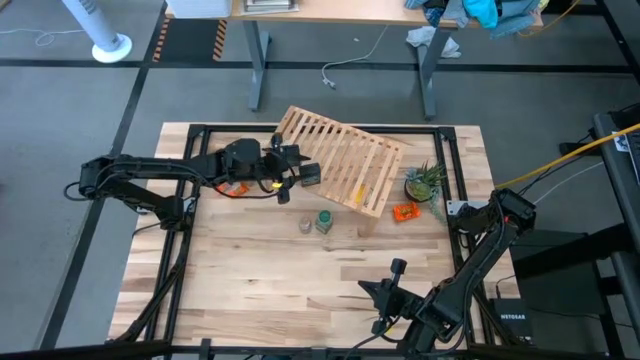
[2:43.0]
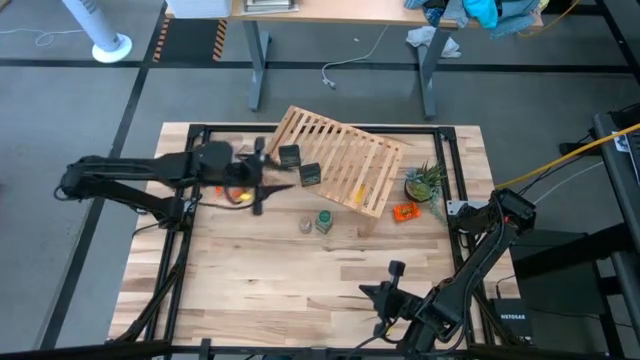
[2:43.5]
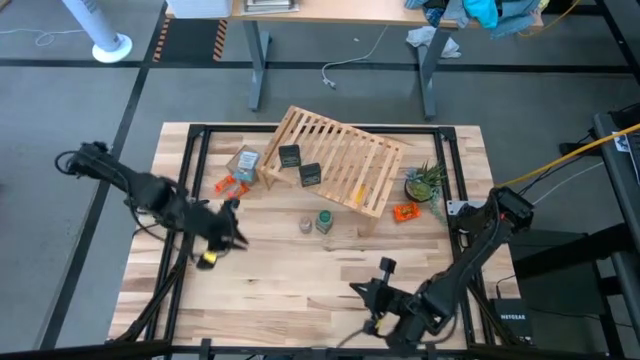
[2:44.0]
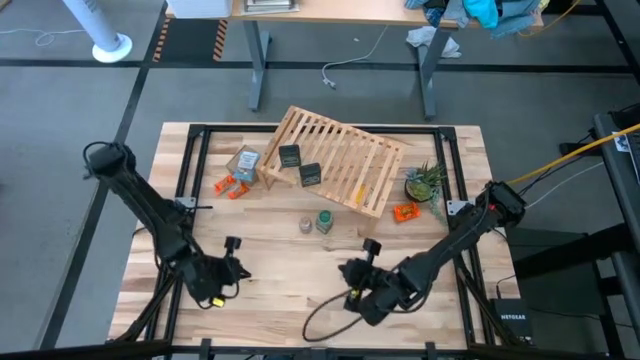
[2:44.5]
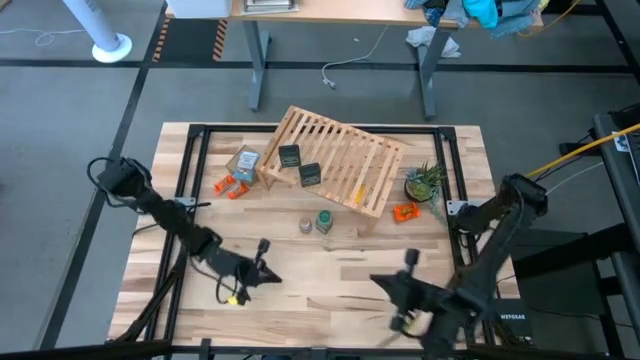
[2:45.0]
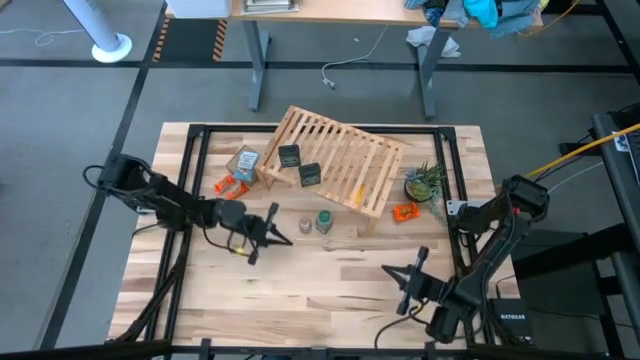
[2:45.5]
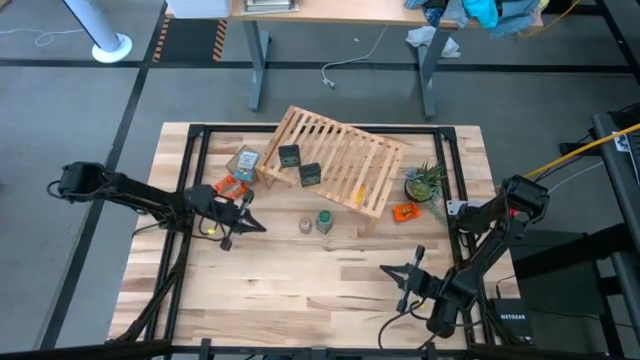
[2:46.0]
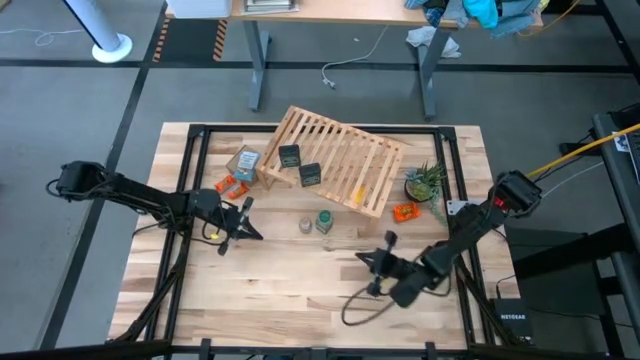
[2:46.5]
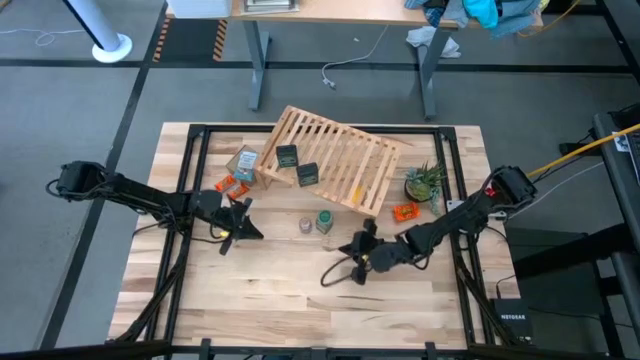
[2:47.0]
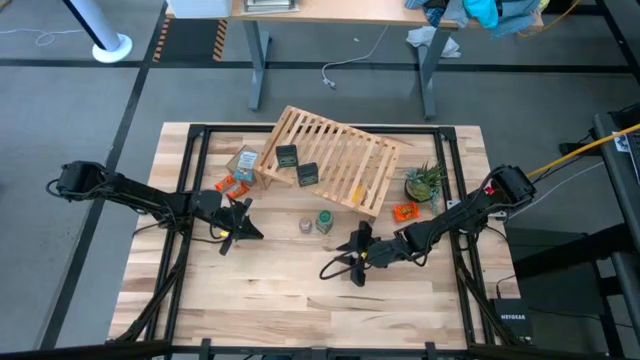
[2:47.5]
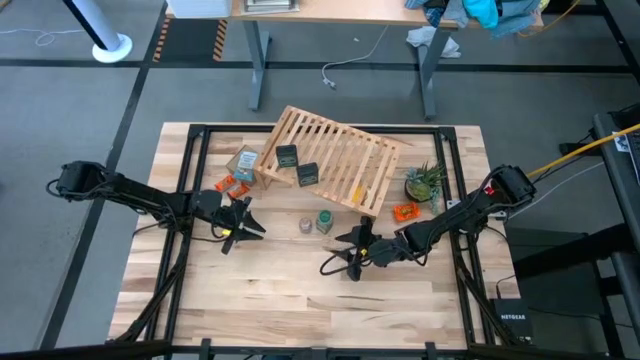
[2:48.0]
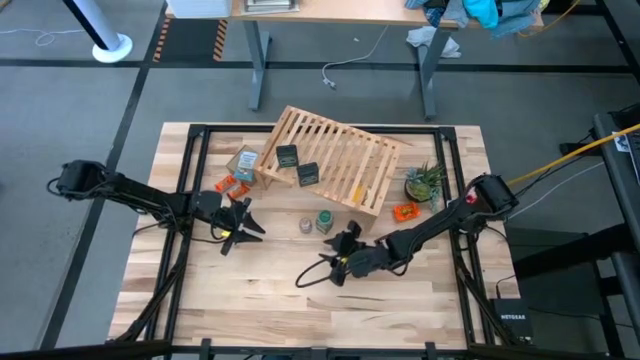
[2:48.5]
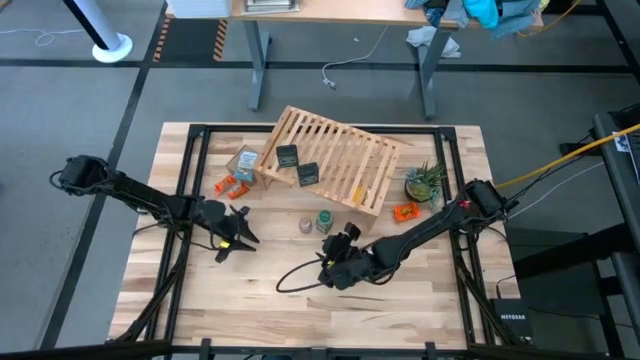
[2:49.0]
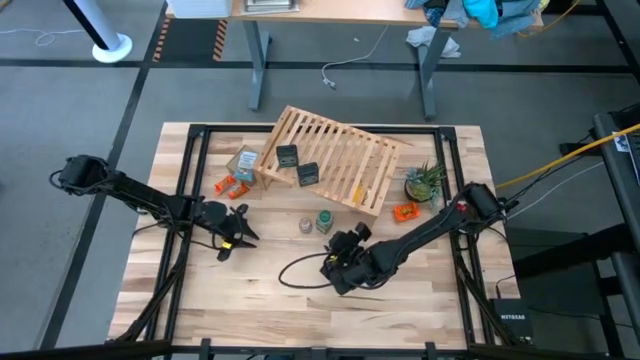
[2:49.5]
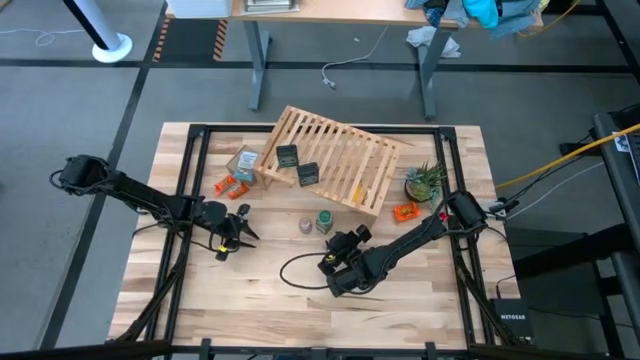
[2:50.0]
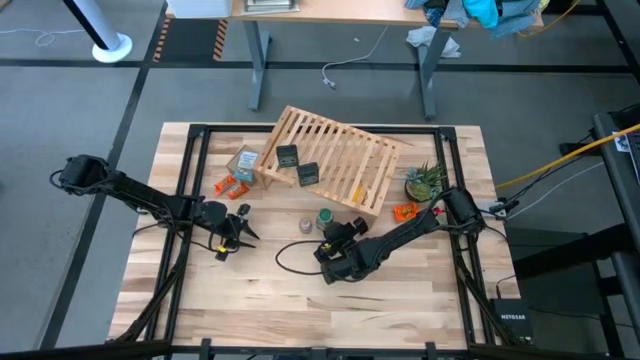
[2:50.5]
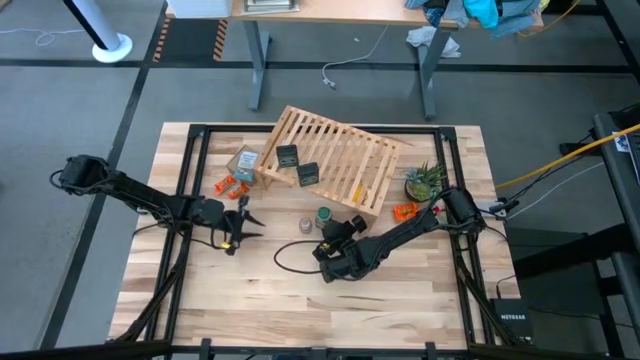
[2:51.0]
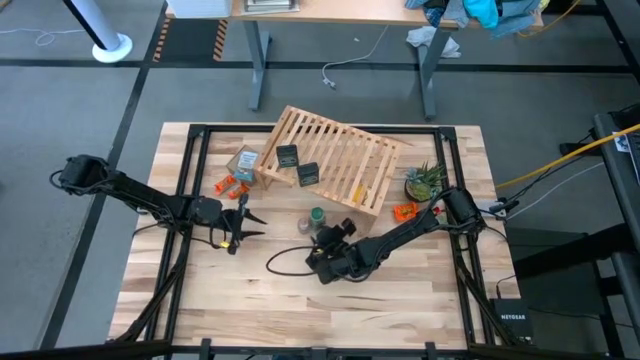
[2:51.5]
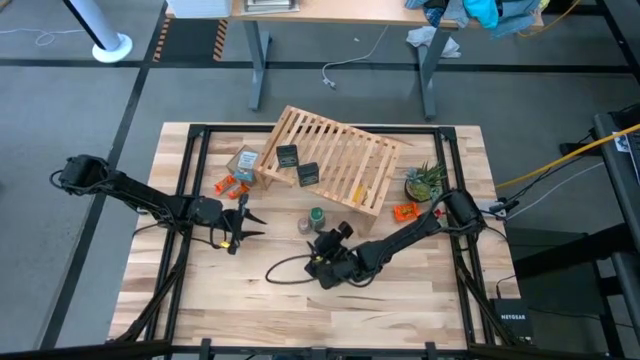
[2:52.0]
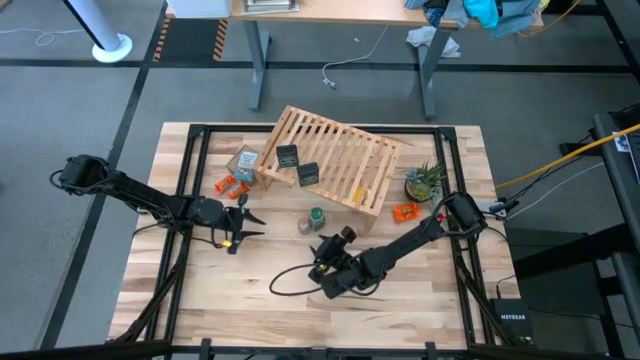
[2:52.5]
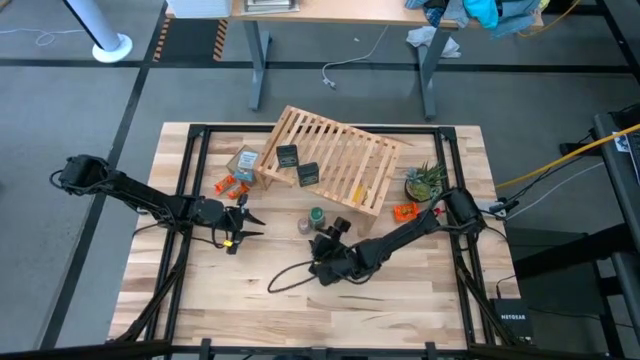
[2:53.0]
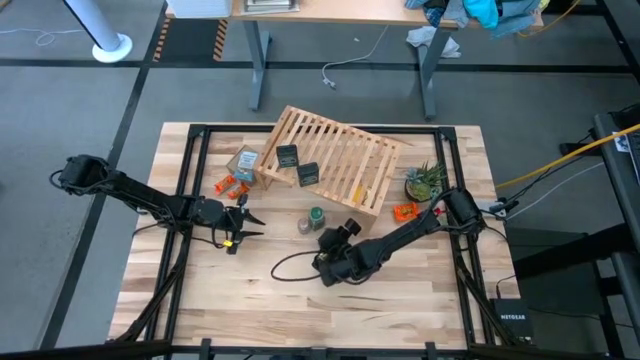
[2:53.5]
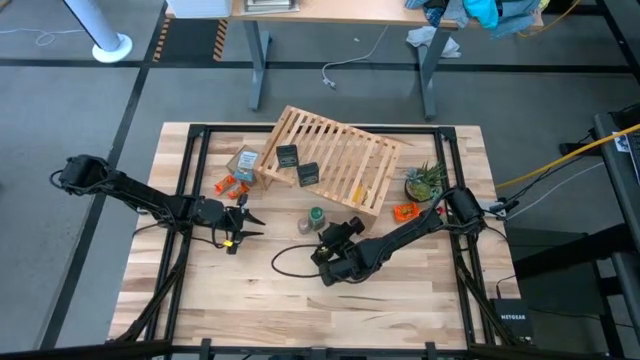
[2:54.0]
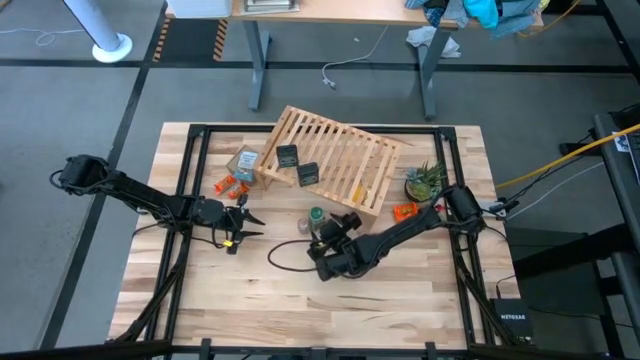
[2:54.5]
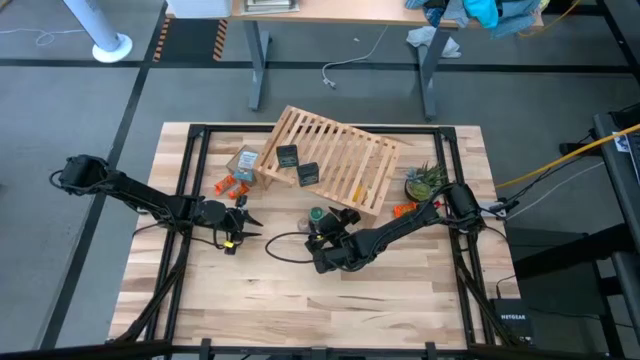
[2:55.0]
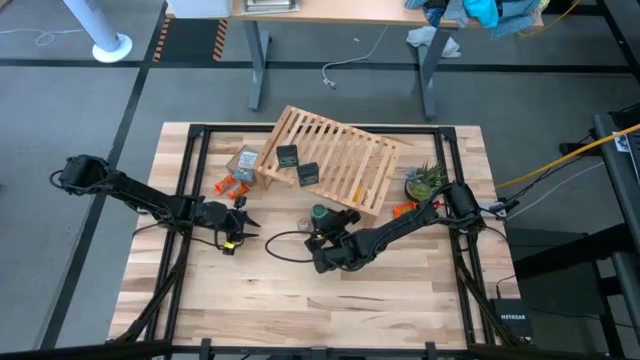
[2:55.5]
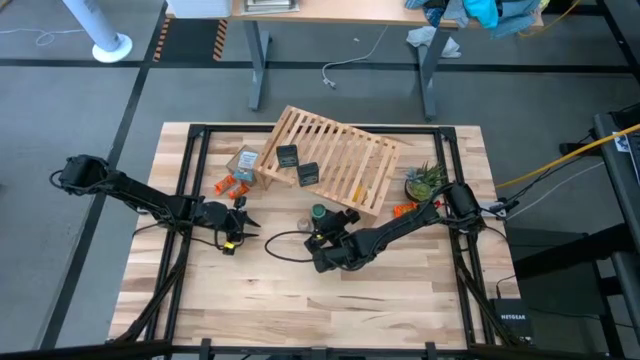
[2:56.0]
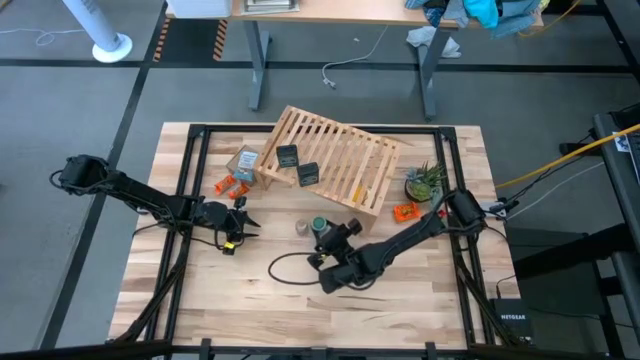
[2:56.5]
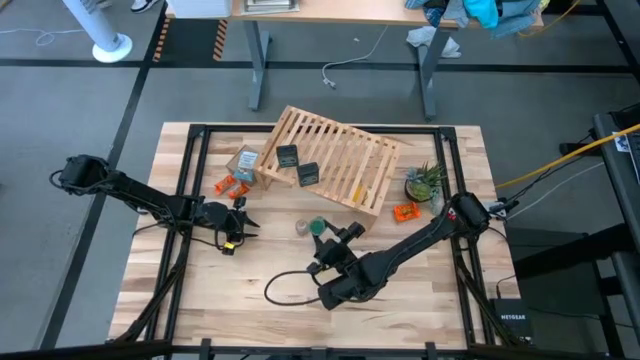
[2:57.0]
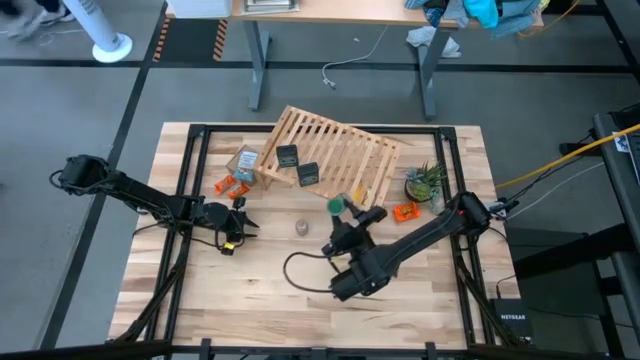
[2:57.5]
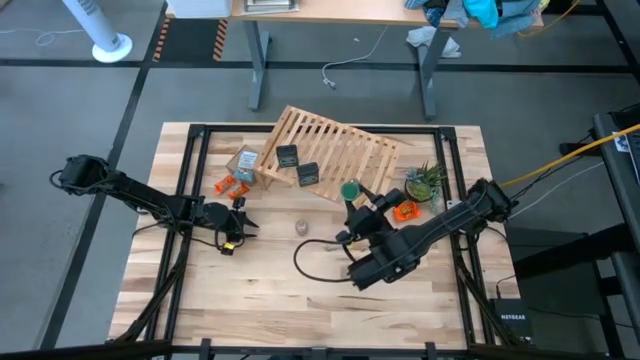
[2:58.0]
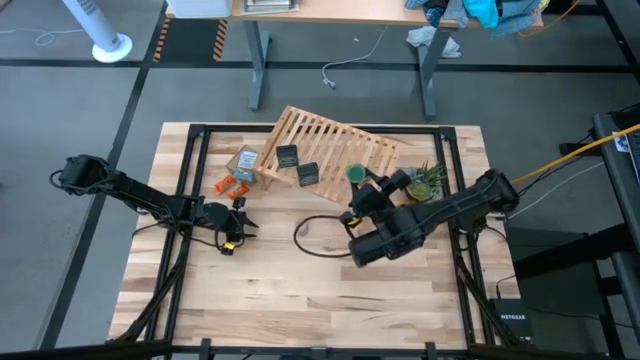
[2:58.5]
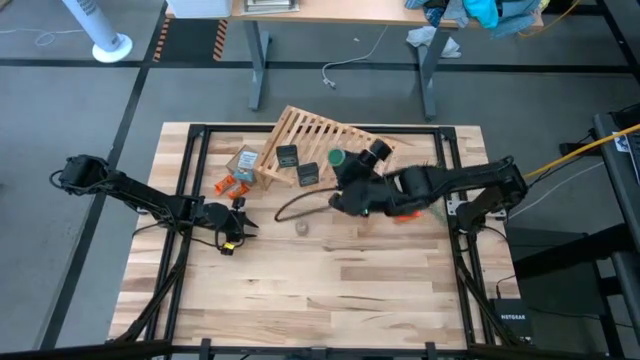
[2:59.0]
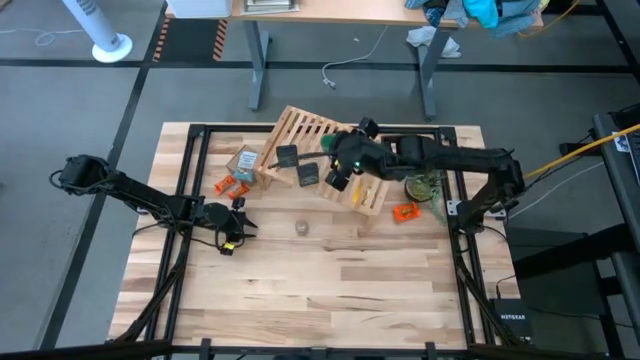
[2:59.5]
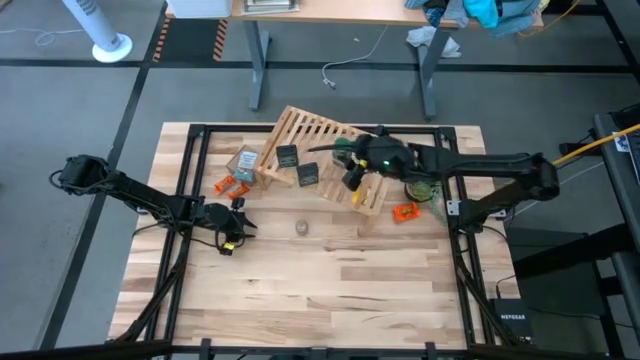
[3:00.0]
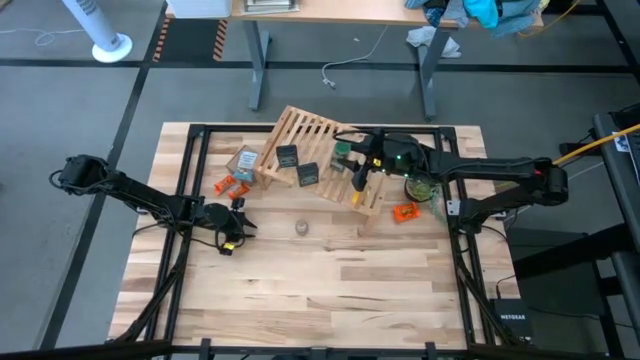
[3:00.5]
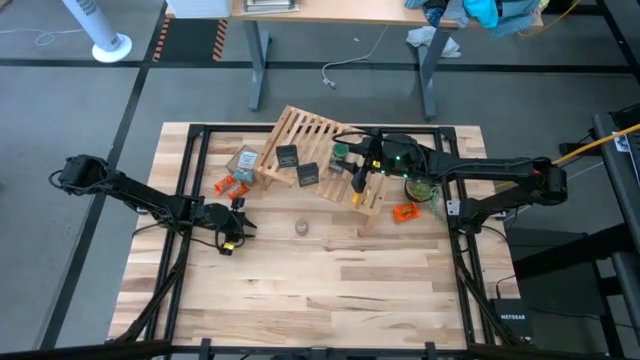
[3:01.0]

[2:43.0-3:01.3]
Task: Shelf spices
Put the green seasoning bottle on the shelf

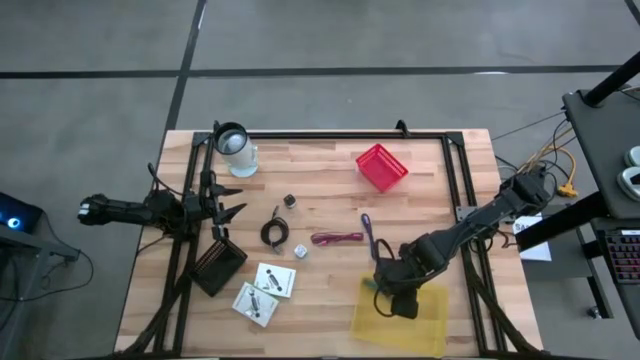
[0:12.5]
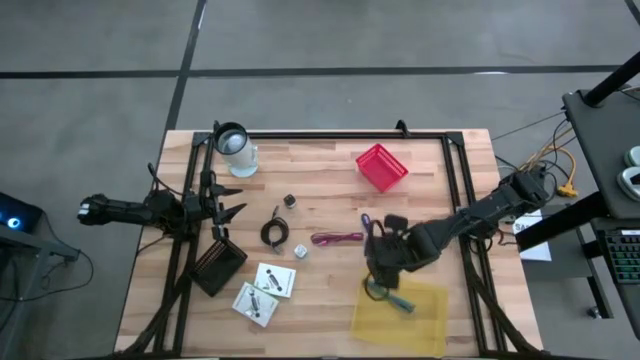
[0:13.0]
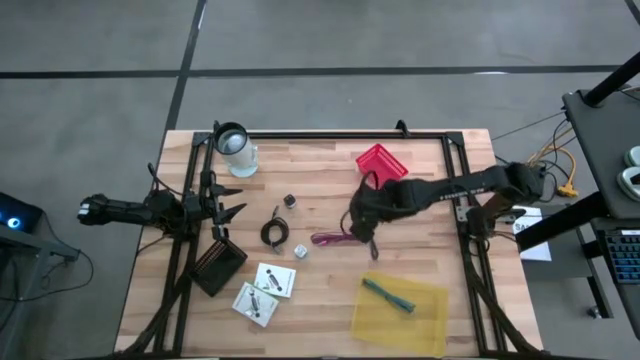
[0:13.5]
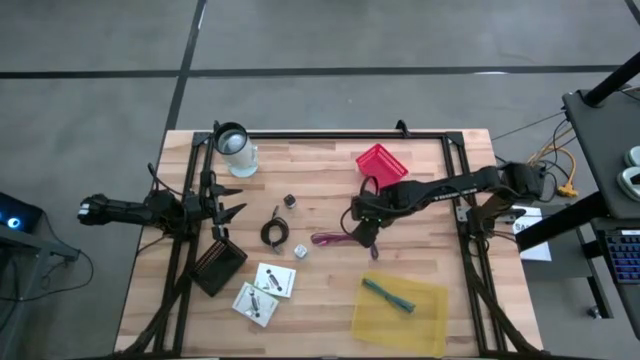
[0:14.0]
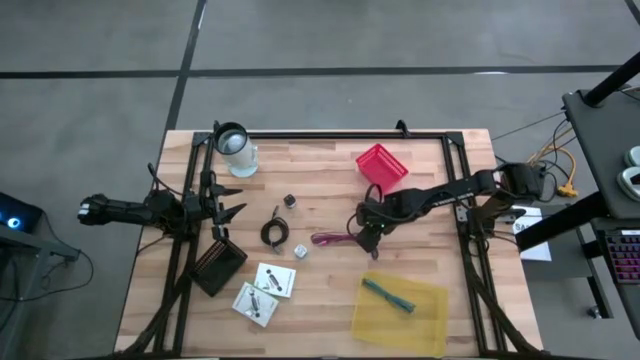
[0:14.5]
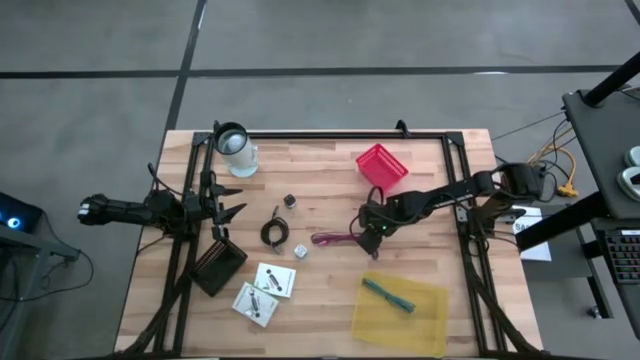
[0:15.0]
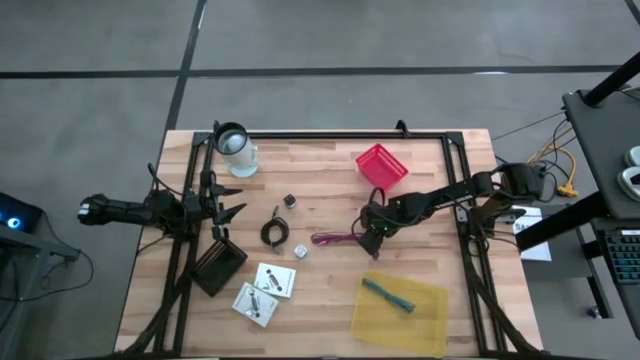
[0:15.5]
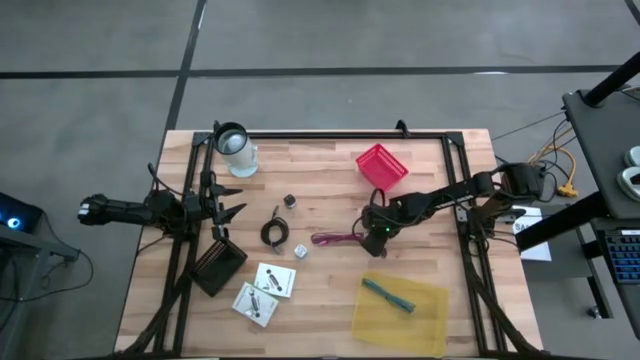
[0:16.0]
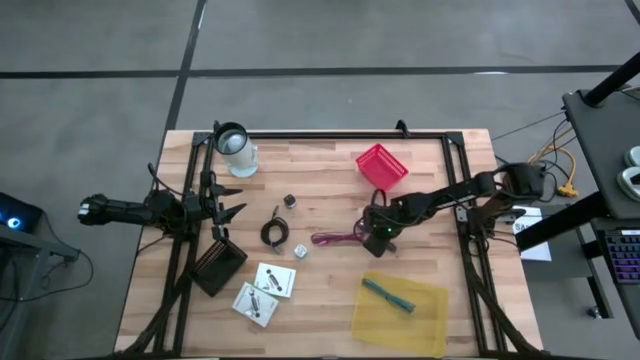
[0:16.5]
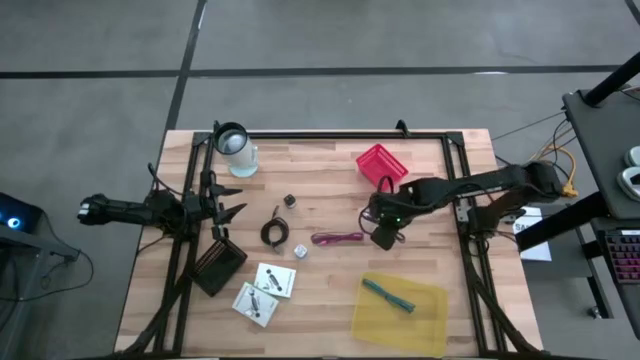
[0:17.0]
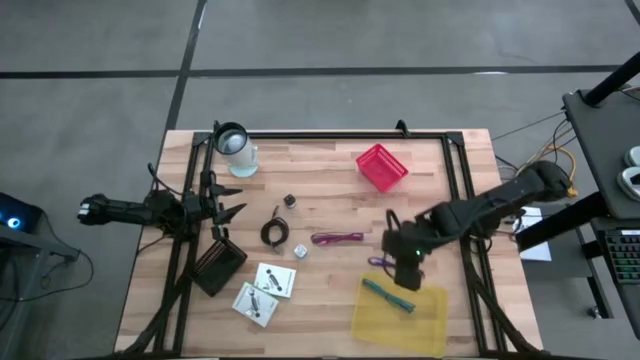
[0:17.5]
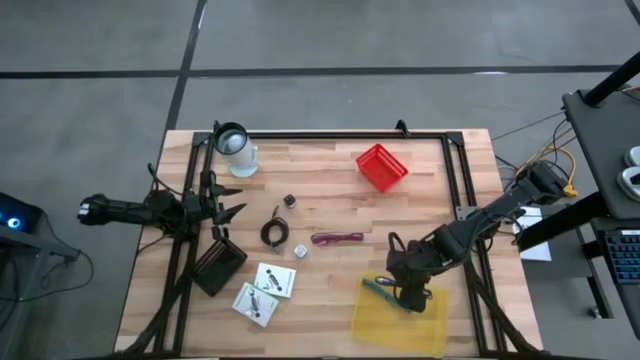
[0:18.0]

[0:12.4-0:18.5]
Task: Pick and place items into bin
Put the blue patterned charger cable into the yellow bin
